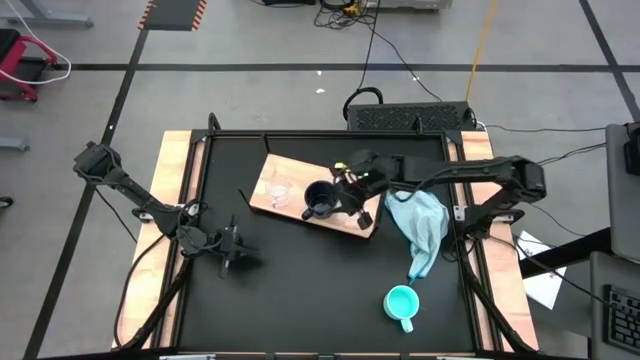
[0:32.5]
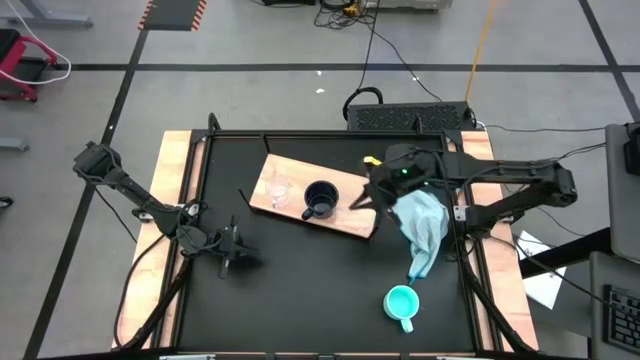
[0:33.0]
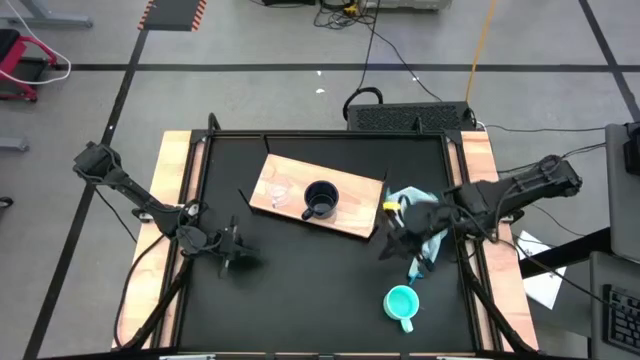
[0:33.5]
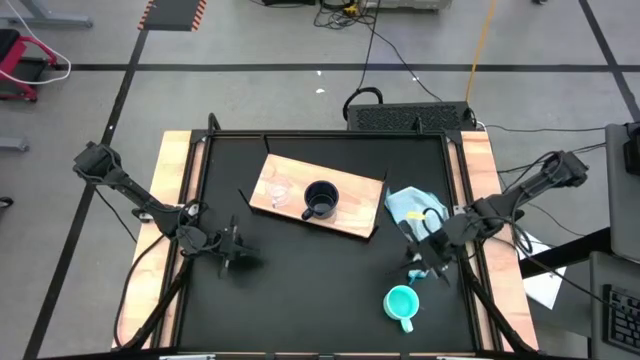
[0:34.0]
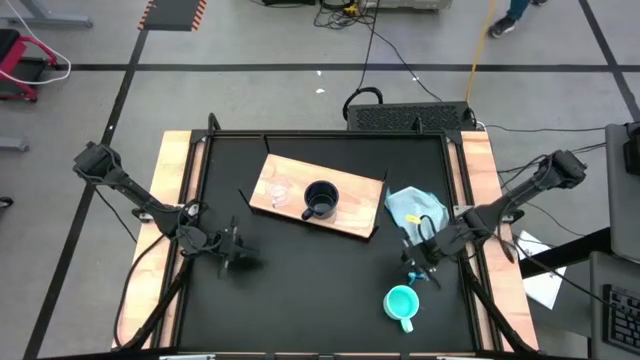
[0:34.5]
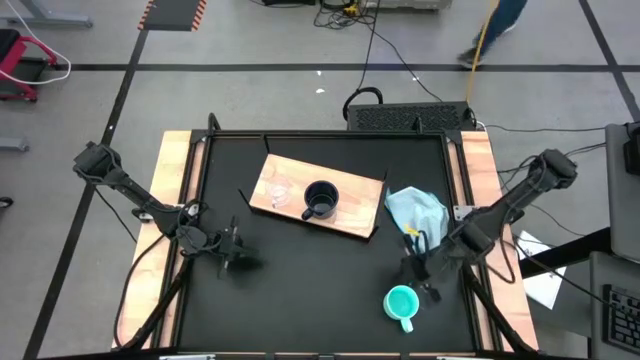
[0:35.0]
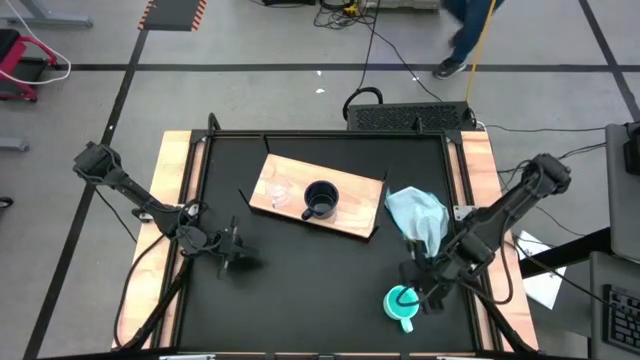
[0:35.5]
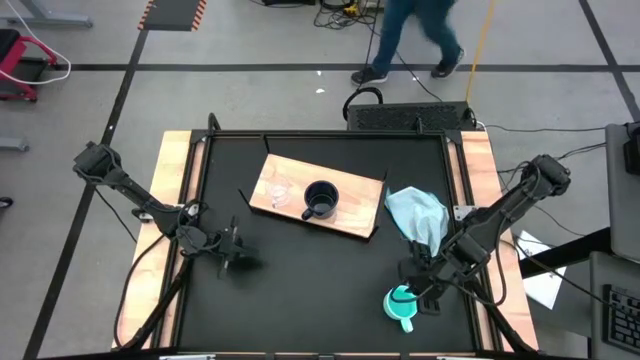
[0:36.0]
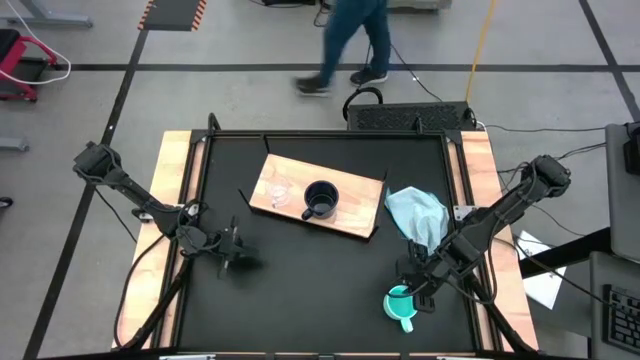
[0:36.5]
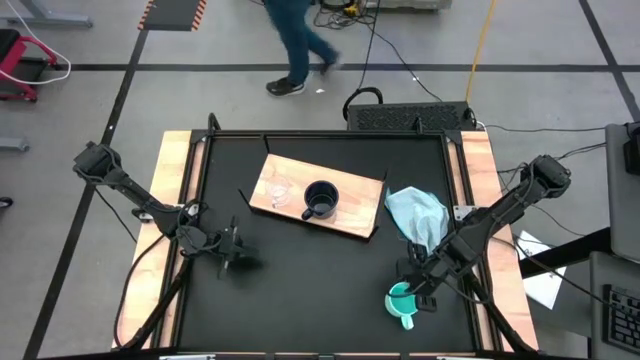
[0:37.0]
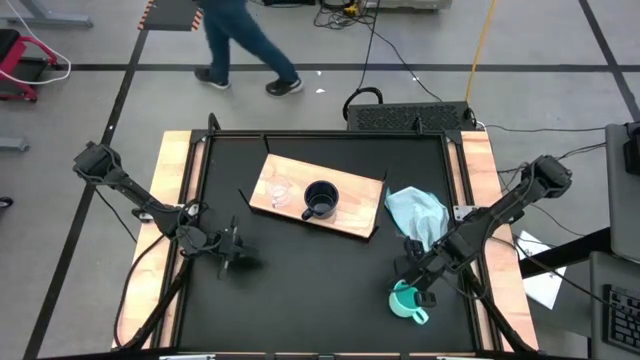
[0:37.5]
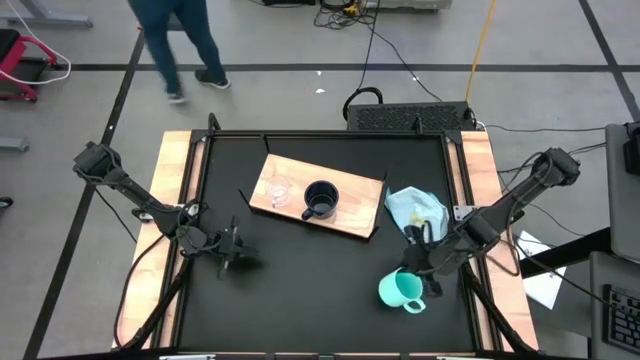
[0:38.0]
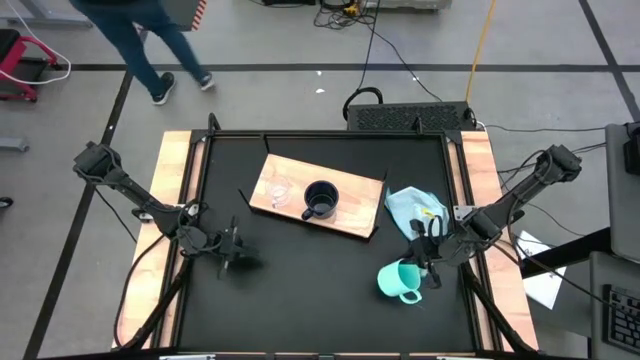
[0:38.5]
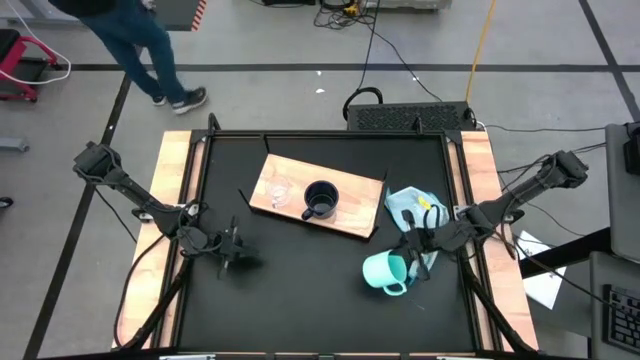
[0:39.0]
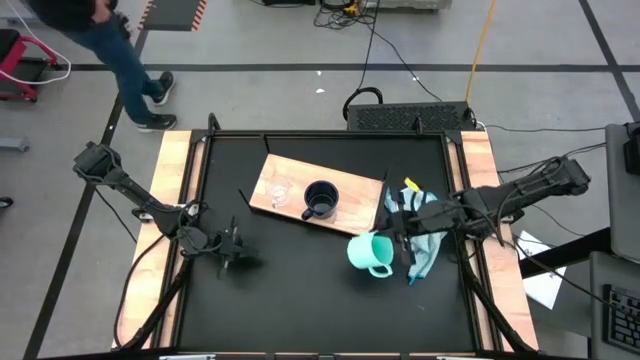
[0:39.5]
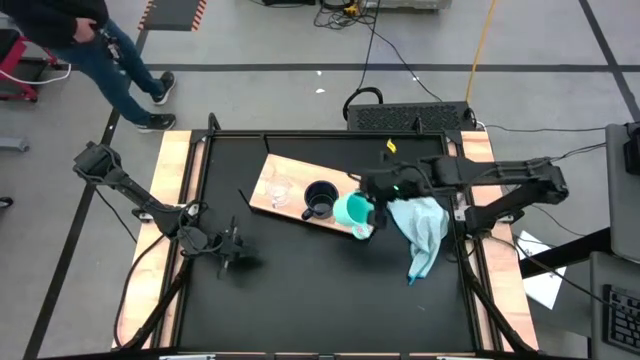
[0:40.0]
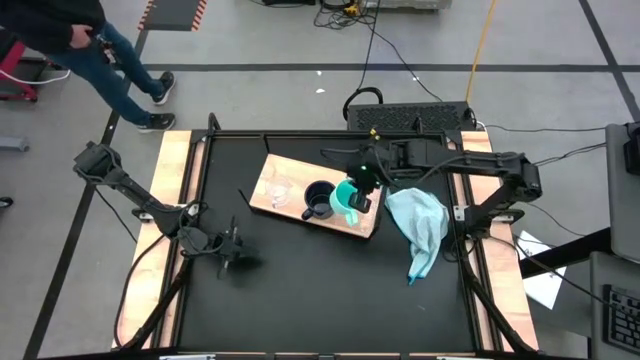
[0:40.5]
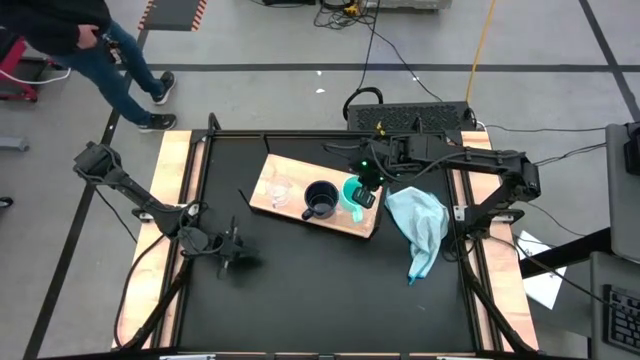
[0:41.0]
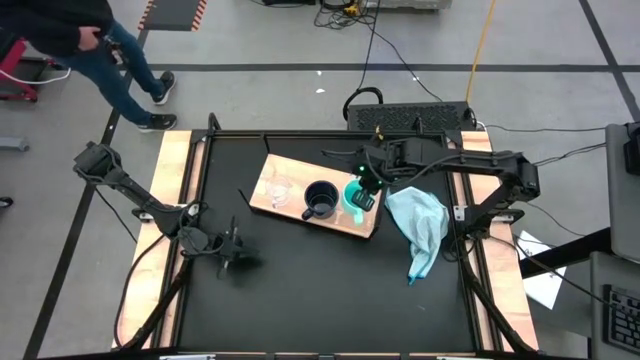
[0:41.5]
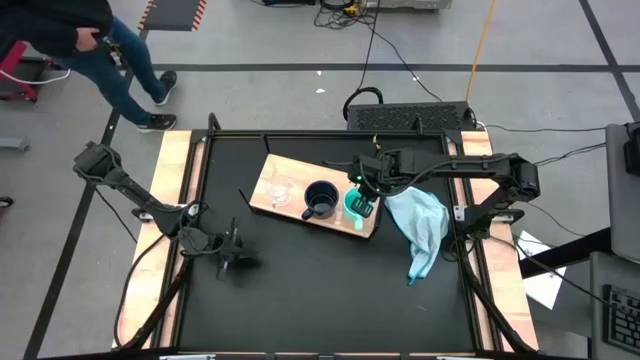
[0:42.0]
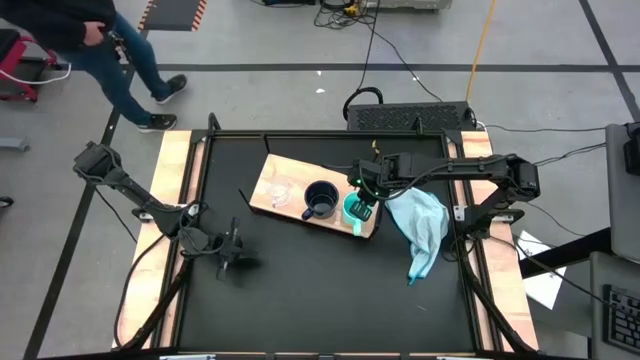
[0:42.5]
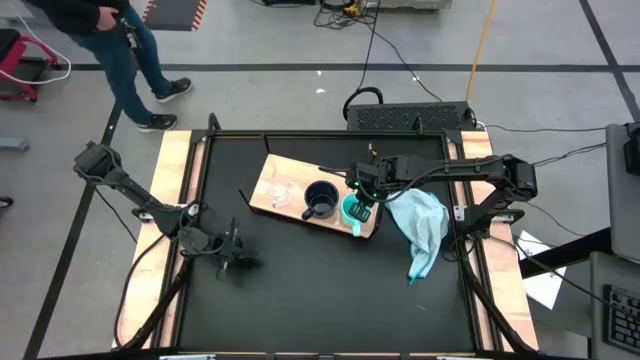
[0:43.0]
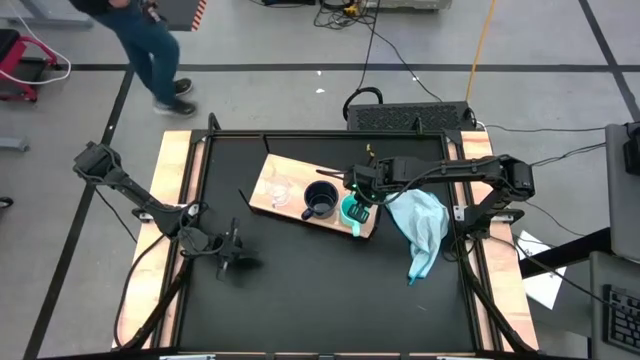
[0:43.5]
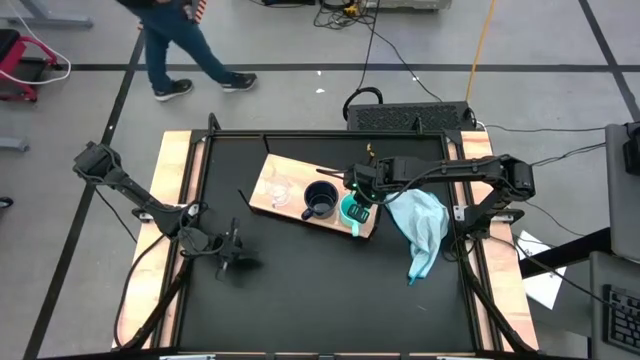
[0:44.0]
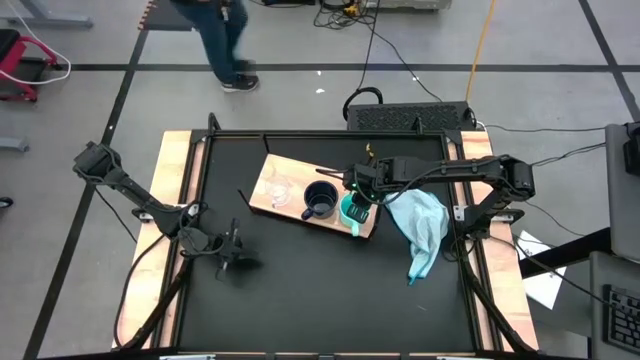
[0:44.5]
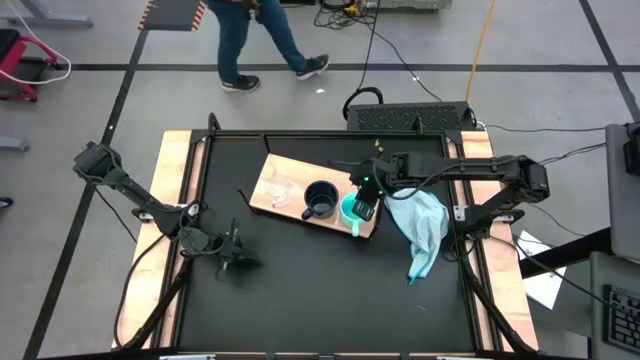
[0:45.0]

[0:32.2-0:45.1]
Task: Stack small to large cups/mugs on shelf
Put the light blue mug on the shelf

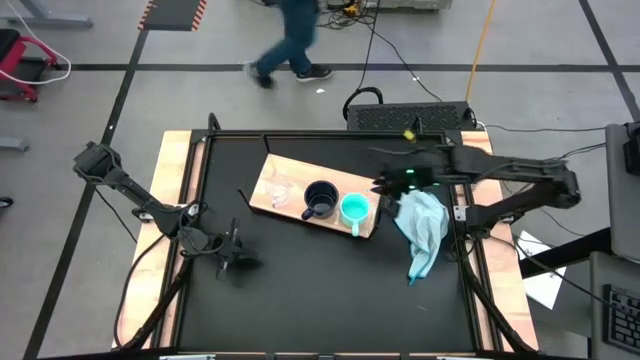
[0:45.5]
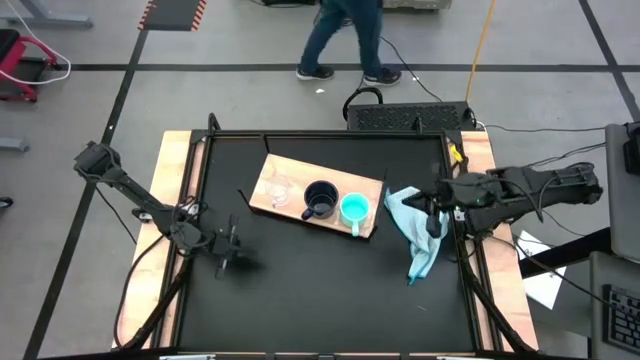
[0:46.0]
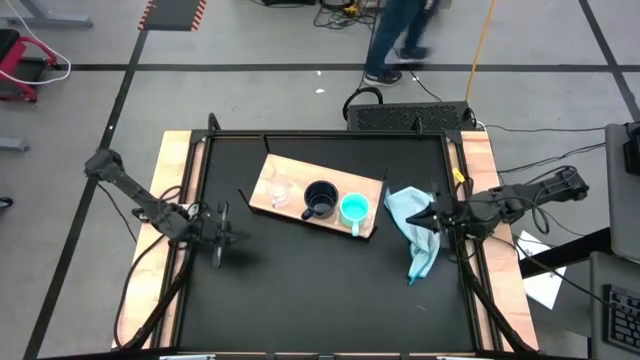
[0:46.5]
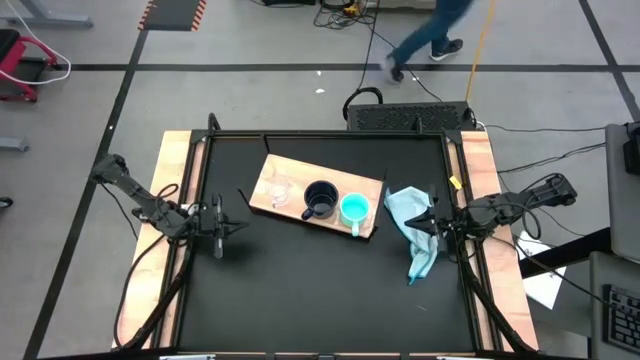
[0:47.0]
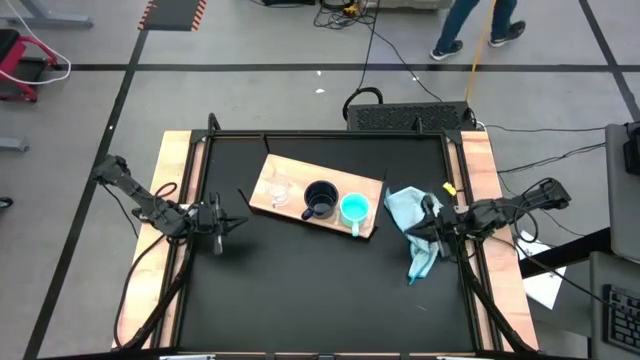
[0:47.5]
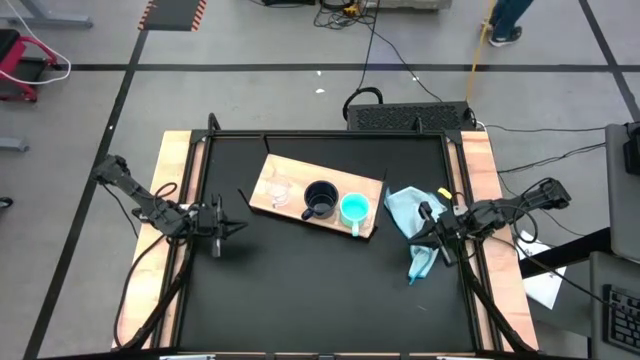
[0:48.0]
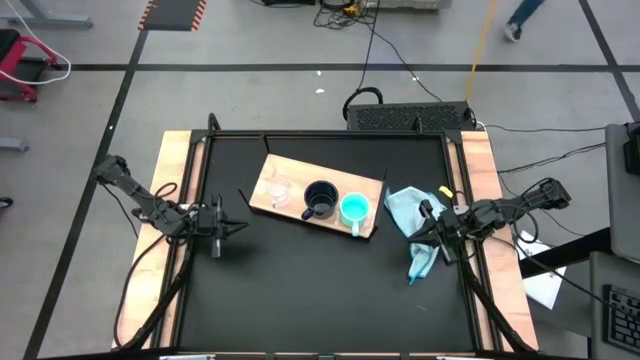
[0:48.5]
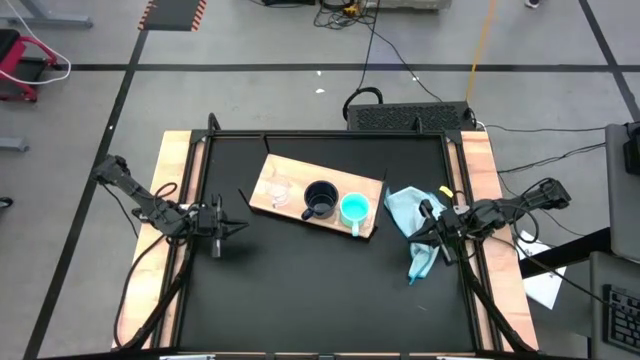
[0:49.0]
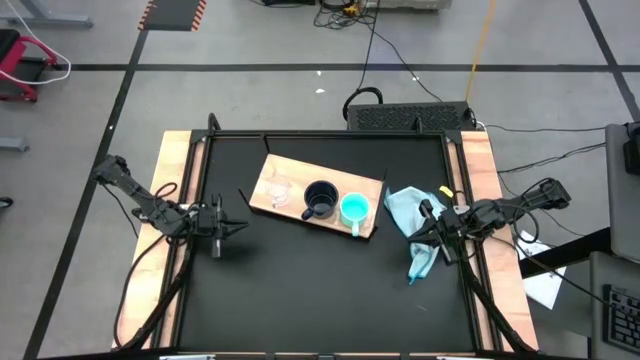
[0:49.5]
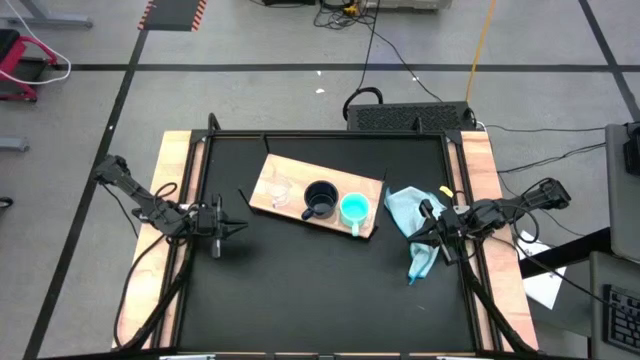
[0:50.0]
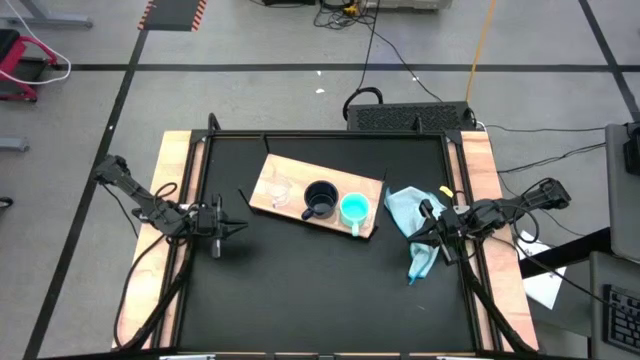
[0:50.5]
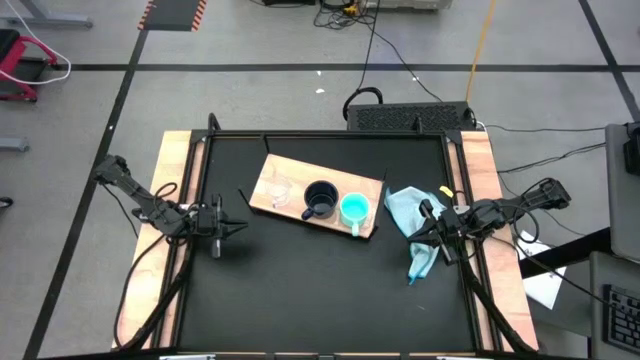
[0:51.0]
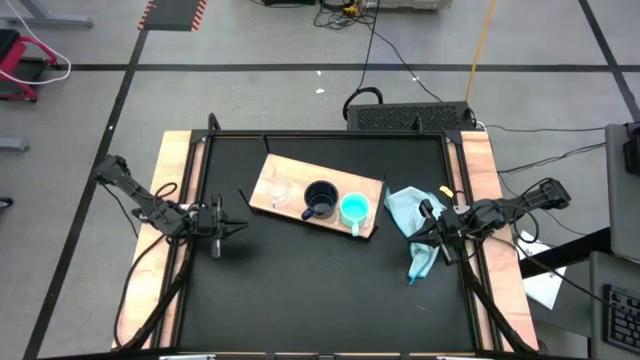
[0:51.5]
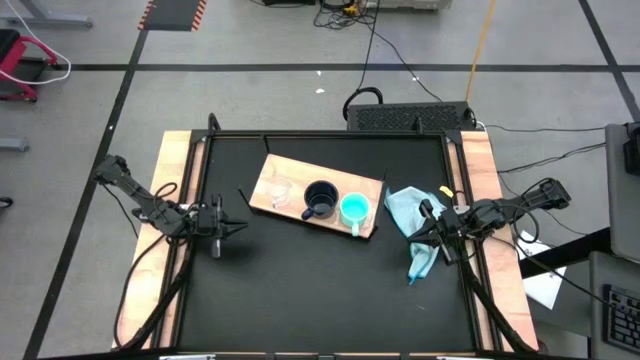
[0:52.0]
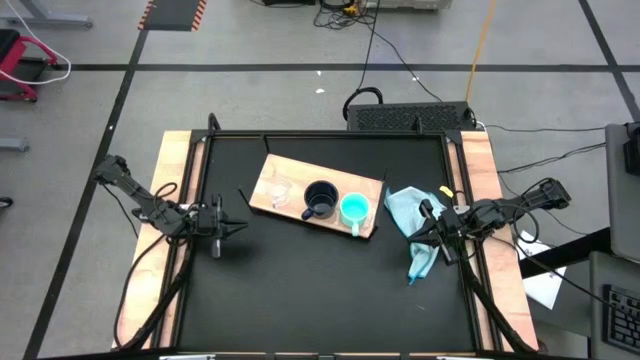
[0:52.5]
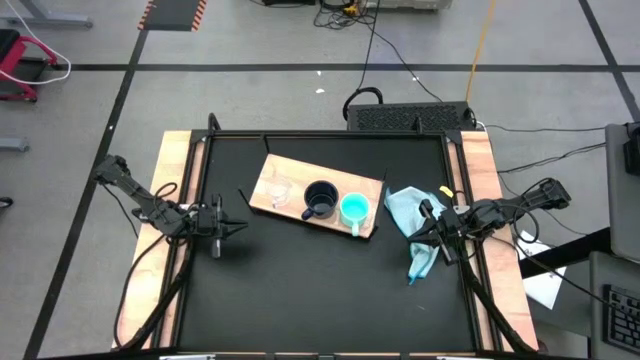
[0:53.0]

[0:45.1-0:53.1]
Return to Home Position
